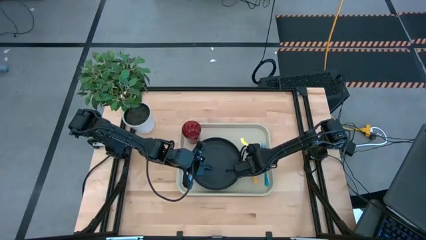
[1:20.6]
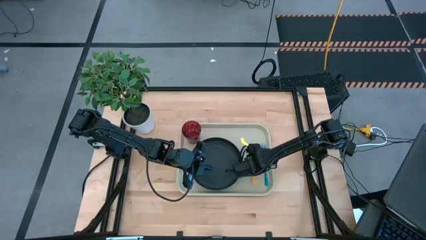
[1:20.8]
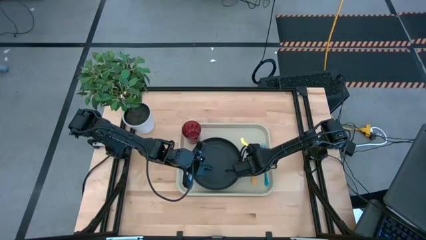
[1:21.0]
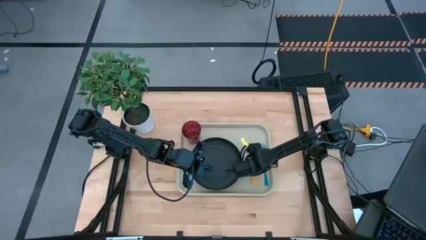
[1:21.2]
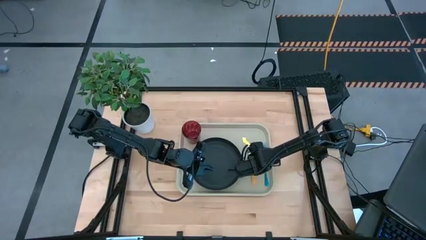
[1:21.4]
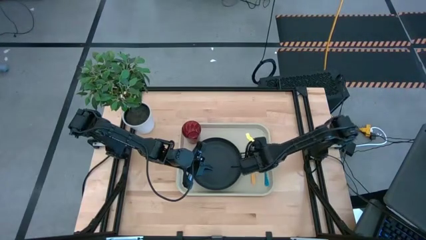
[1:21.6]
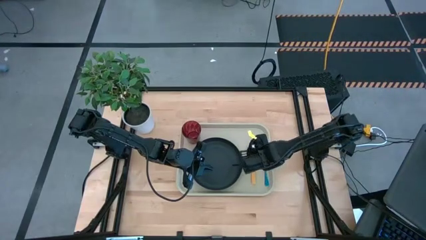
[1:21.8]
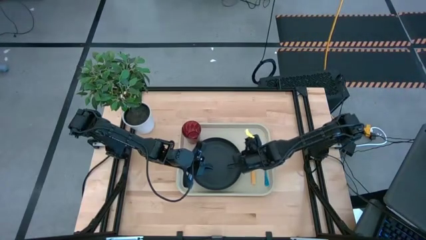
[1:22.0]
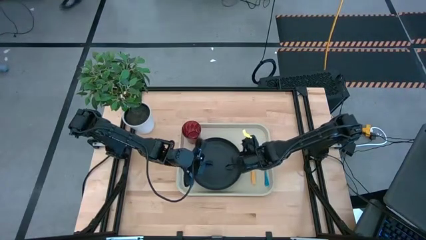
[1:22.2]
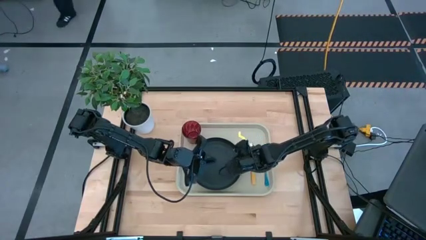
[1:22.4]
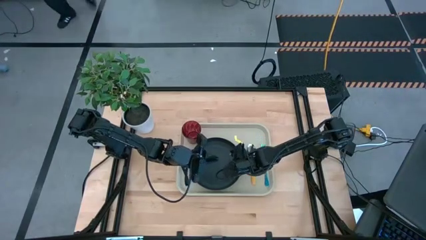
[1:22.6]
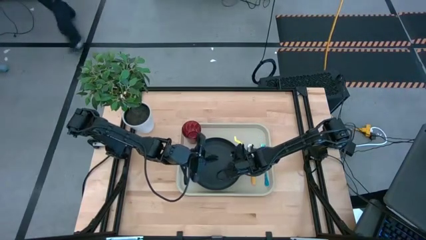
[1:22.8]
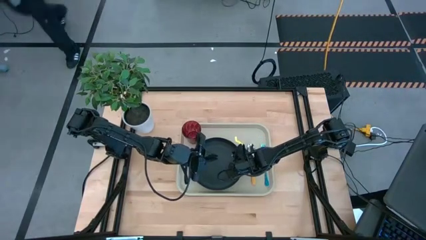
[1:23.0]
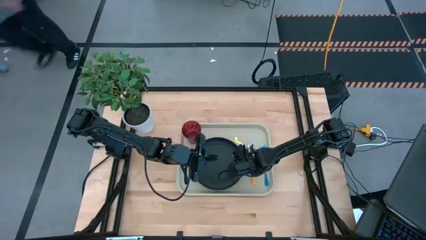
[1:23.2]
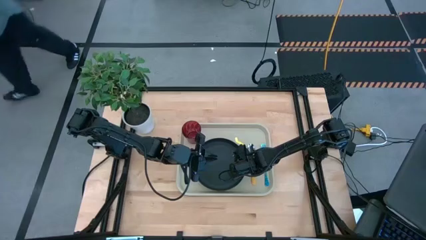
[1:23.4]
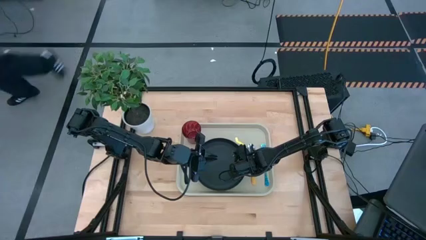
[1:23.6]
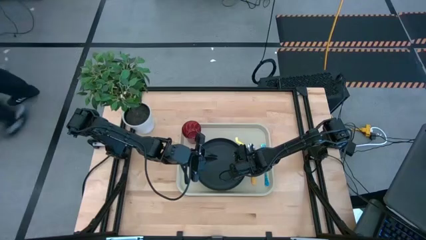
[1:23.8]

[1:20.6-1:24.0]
Task: Pick and place plate/cup/fork/spoon on tray
Adjust the plate on the tray

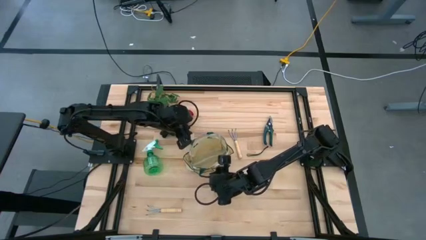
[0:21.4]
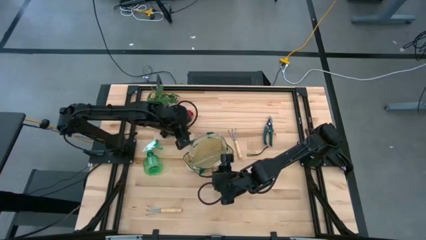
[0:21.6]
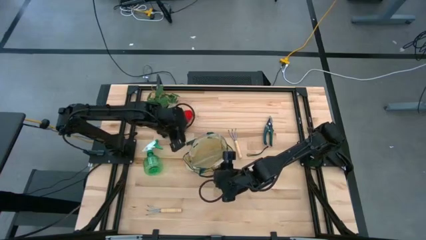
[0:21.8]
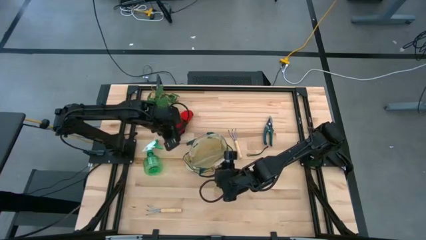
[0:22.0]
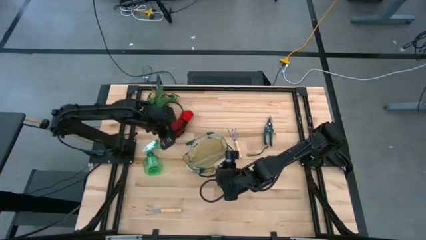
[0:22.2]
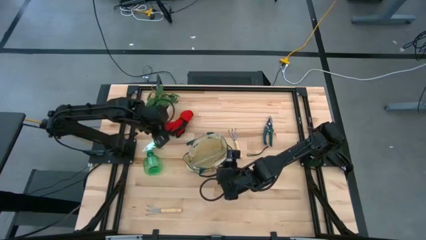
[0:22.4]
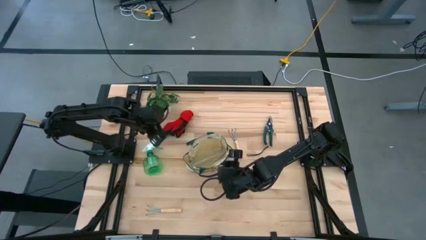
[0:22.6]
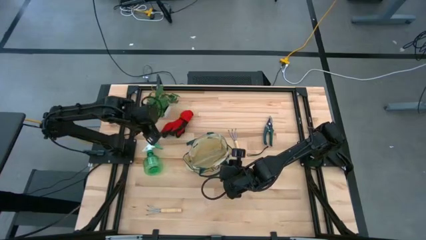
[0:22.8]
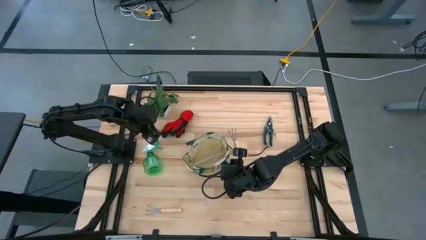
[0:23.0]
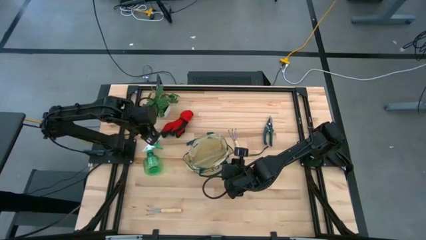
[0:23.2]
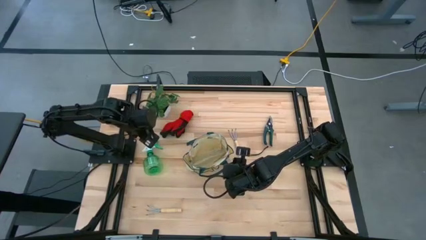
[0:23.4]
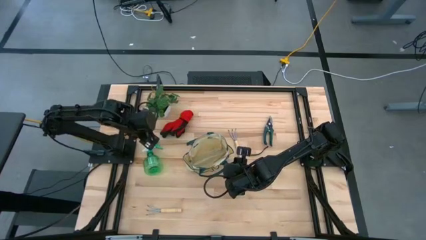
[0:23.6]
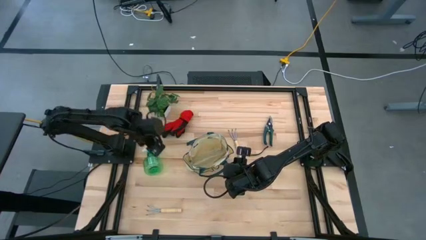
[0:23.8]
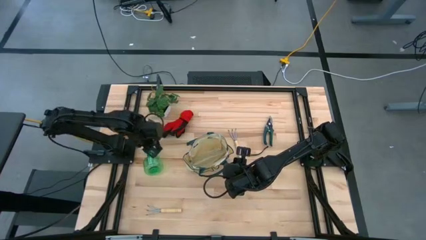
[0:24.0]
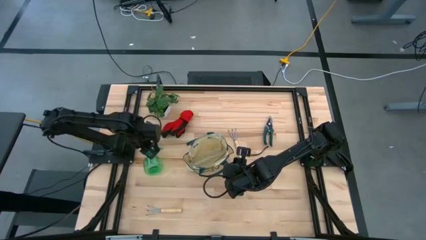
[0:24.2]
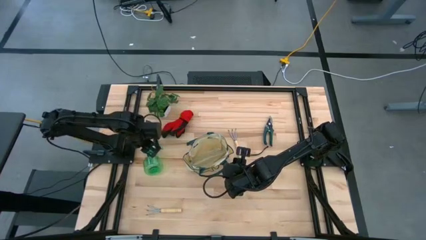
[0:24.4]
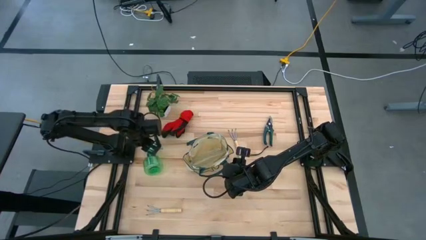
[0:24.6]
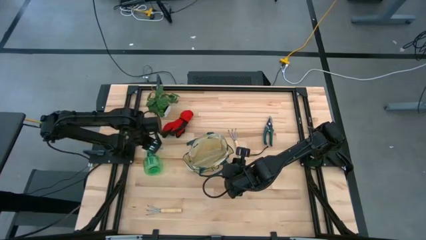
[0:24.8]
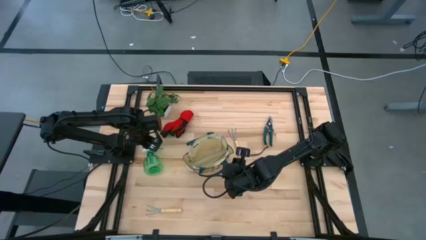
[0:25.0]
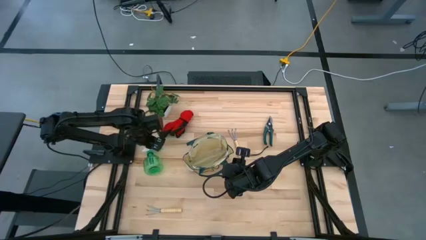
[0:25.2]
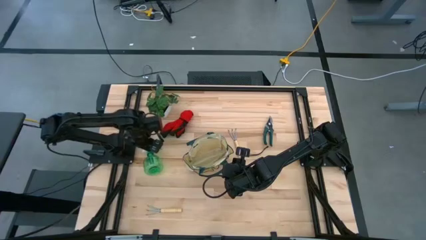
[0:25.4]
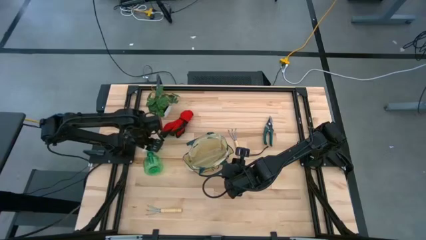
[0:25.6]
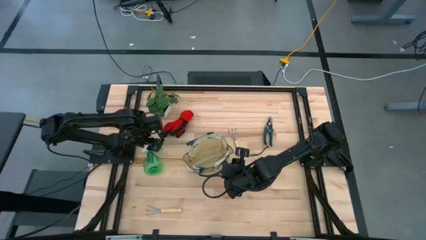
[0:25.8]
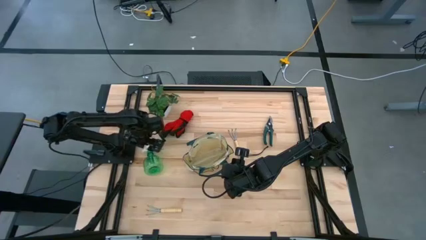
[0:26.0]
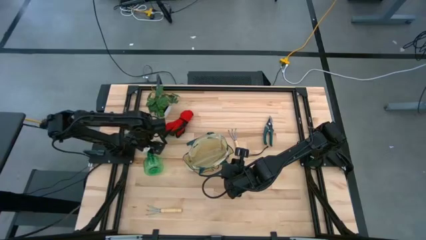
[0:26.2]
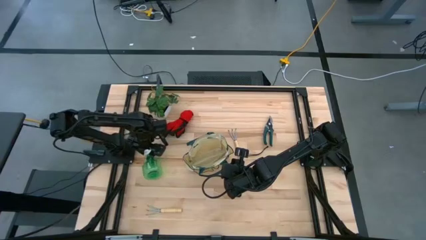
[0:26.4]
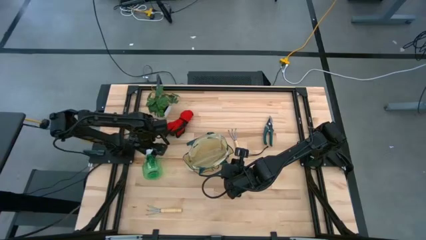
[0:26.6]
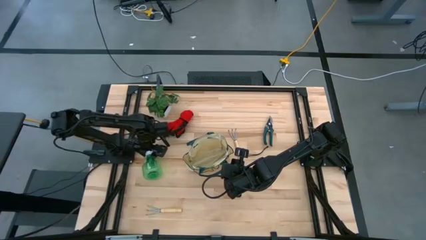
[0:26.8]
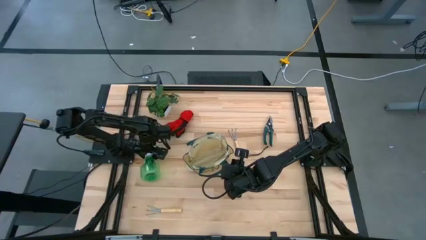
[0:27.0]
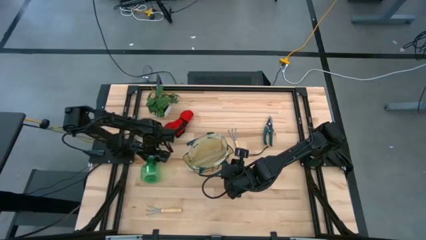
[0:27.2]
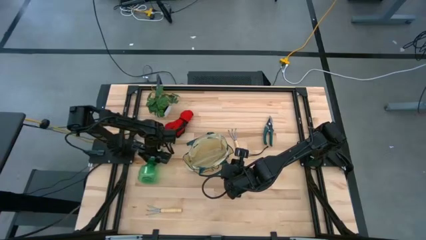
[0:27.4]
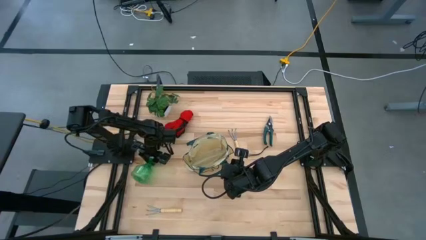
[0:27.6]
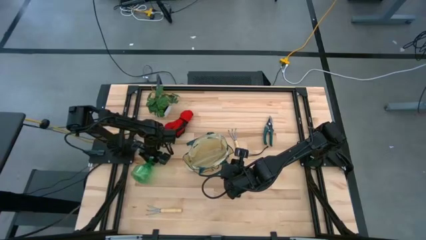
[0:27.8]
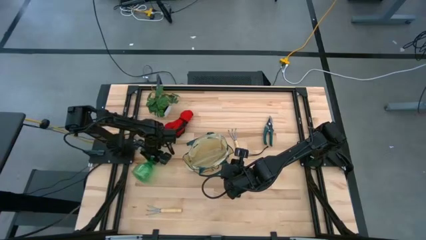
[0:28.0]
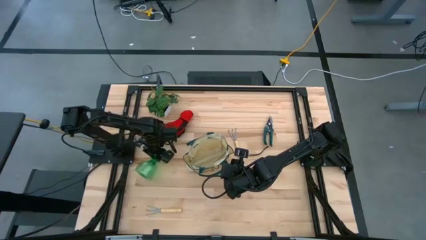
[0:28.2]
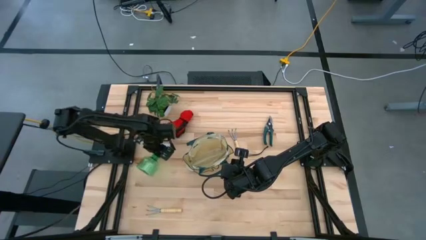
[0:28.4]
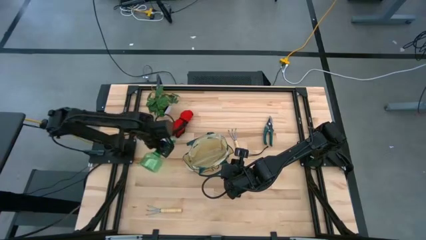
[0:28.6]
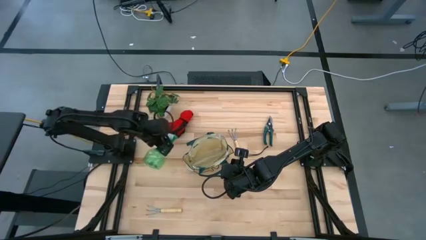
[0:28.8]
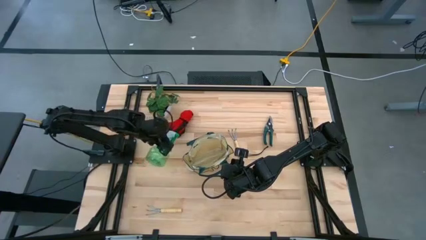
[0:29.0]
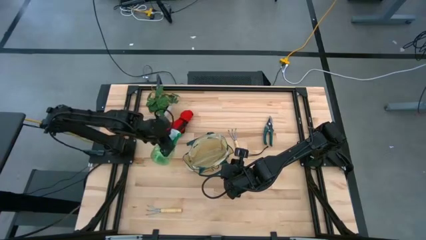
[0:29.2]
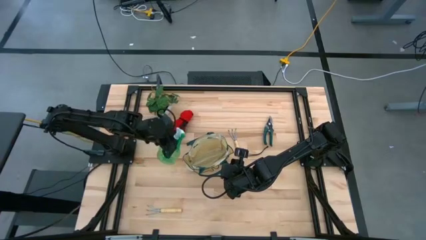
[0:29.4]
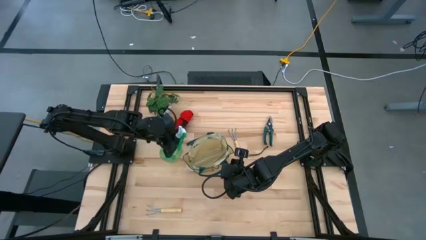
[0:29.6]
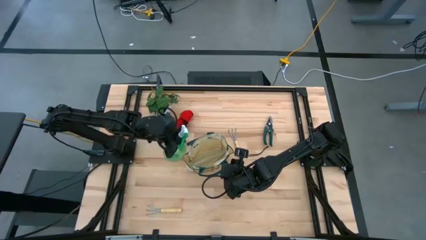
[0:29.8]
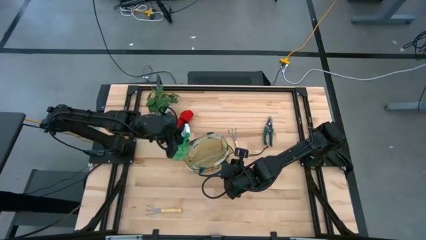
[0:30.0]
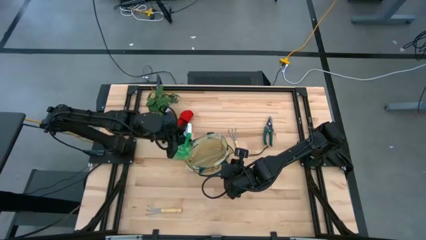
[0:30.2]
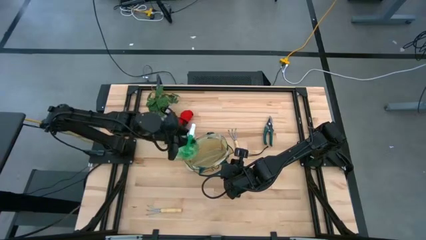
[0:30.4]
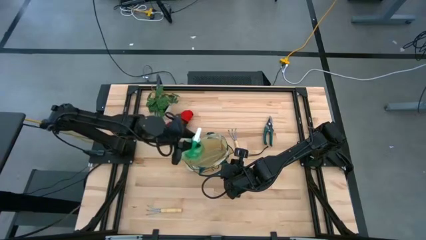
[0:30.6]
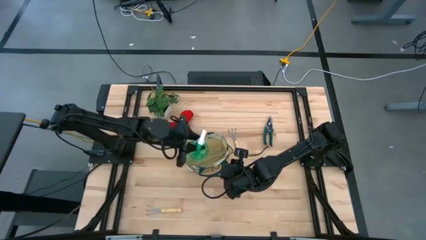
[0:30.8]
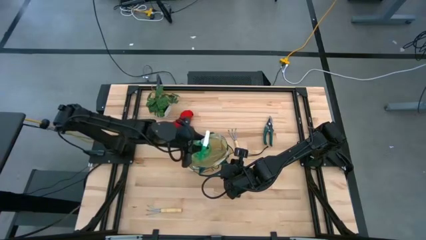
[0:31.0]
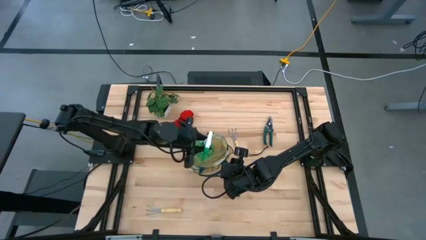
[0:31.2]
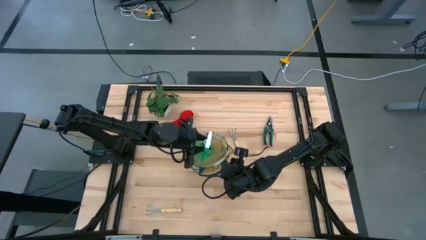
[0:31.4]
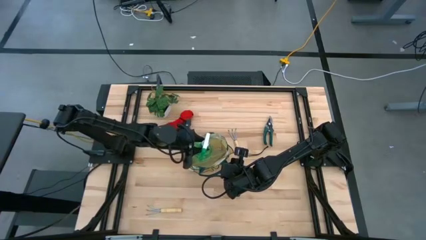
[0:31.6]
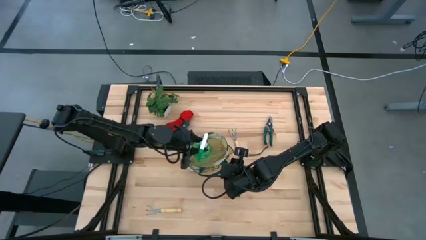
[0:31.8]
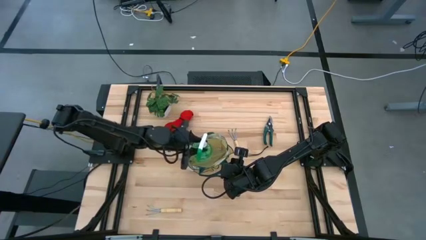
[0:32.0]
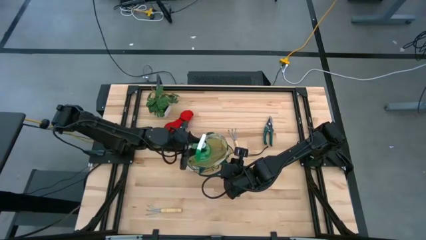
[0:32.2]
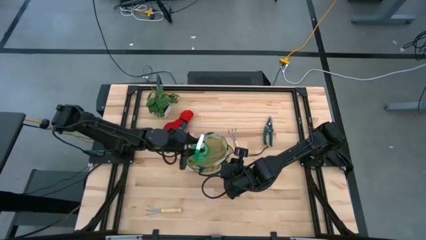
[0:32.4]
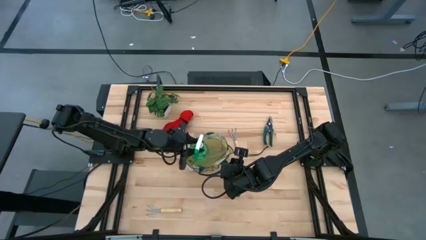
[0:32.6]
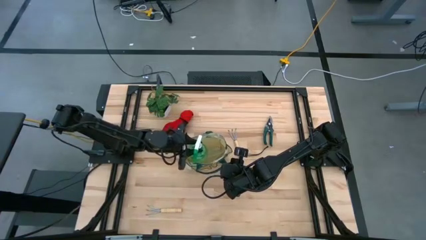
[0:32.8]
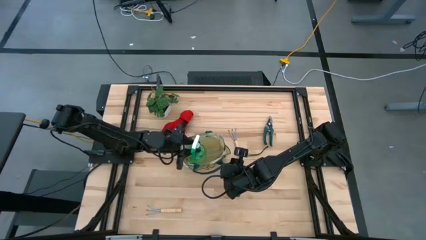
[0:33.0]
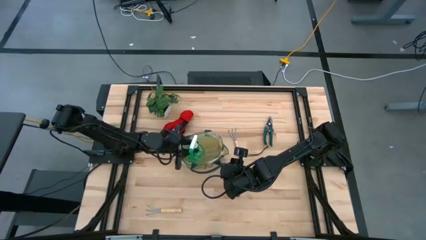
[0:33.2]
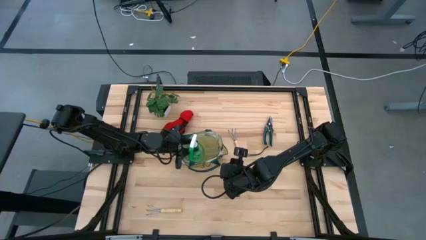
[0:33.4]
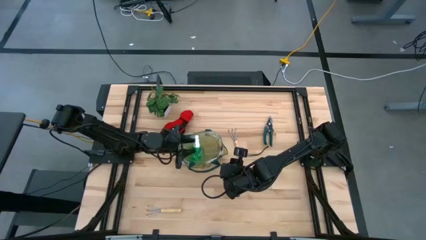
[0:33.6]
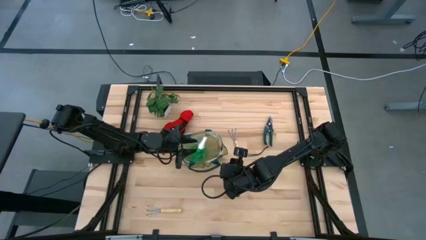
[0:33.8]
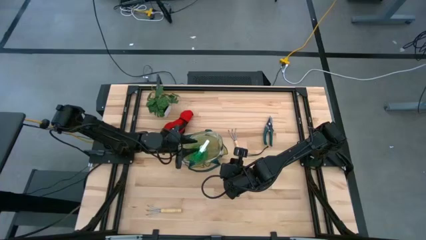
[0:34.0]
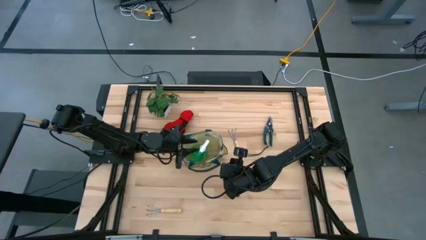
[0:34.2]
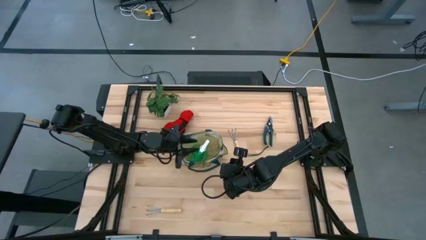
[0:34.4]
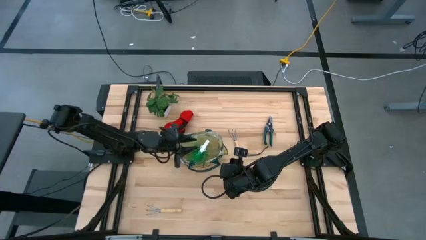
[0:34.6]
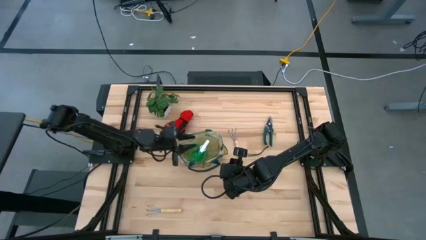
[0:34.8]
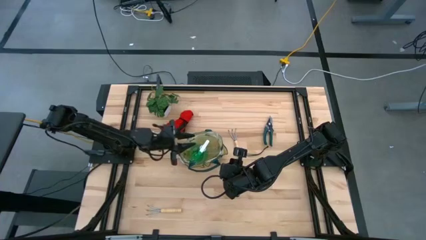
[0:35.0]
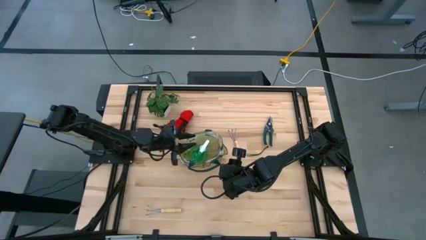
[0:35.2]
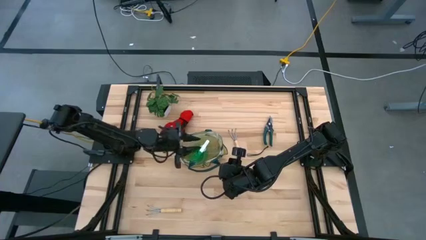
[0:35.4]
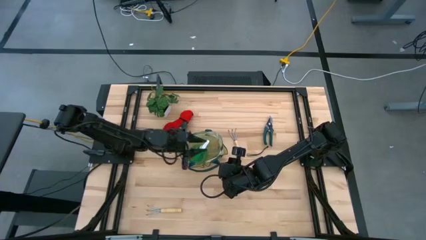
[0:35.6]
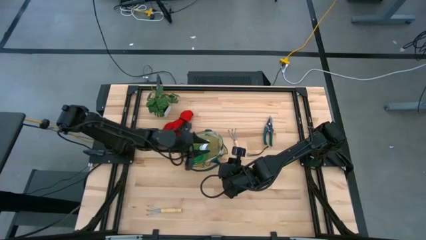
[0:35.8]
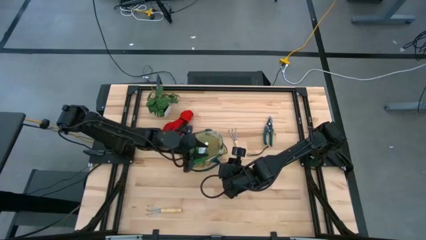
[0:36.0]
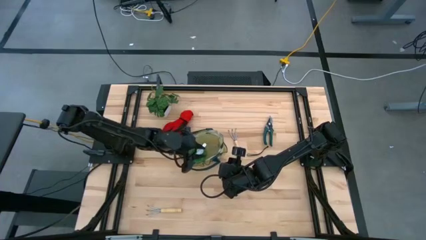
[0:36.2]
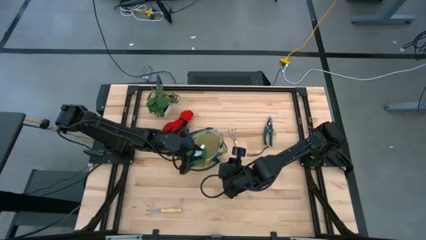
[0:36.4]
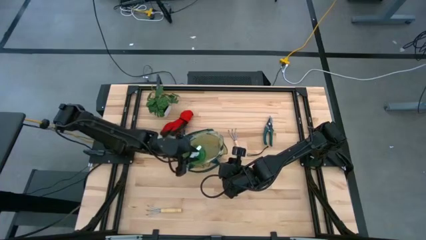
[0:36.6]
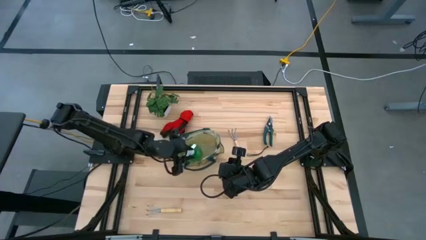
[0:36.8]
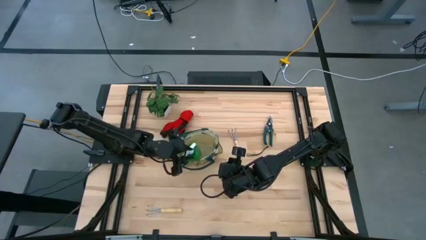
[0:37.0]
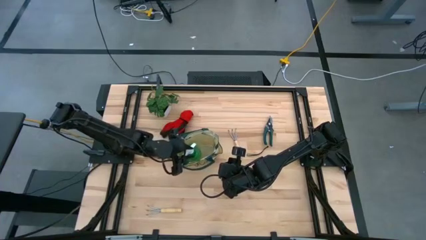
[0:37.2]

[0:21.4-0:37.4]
Task: Pick & Place Garden tools in Gardening bag
Put the spray bottle into the gardening bag
